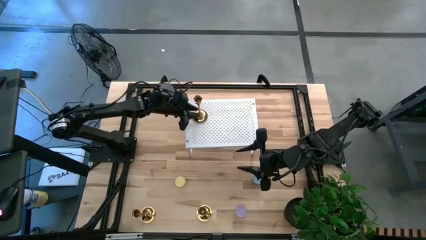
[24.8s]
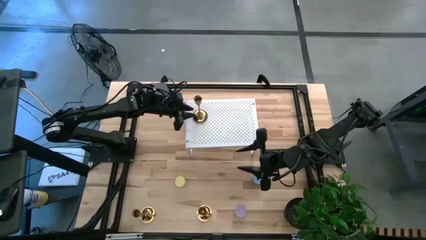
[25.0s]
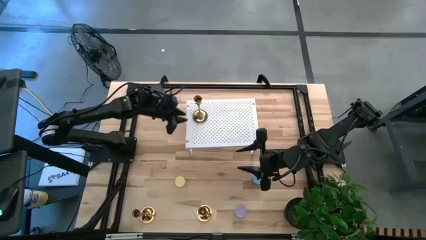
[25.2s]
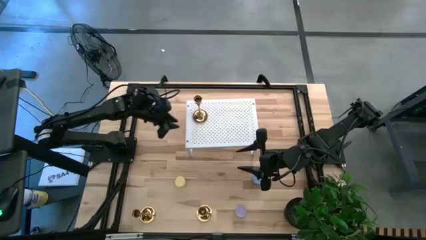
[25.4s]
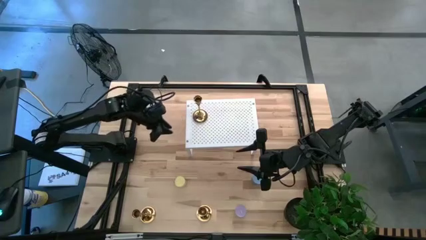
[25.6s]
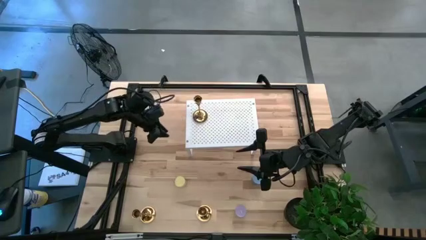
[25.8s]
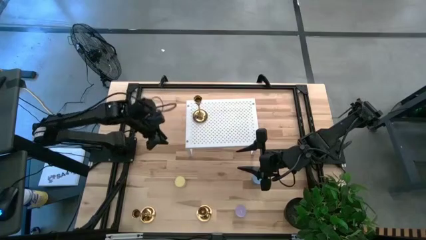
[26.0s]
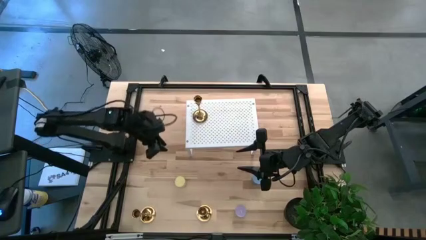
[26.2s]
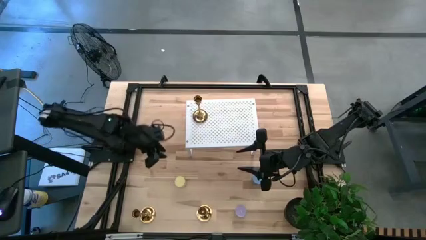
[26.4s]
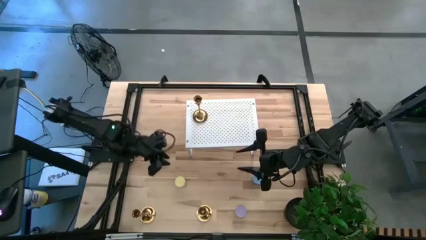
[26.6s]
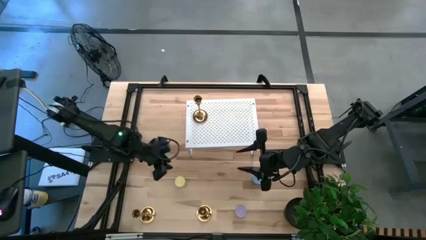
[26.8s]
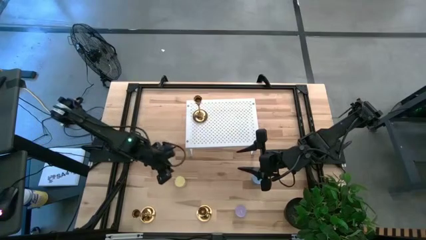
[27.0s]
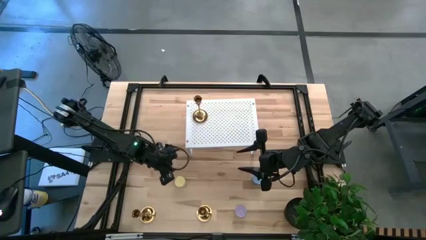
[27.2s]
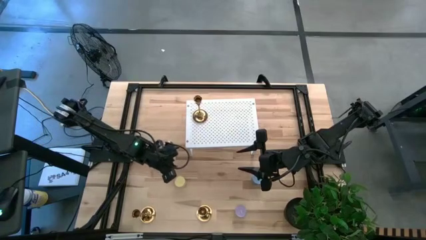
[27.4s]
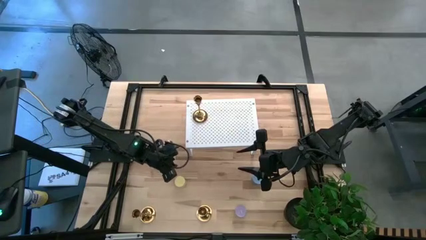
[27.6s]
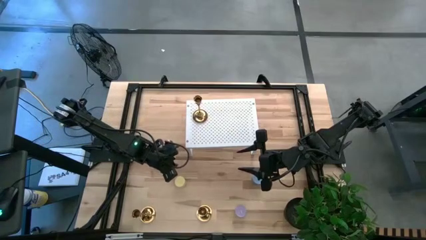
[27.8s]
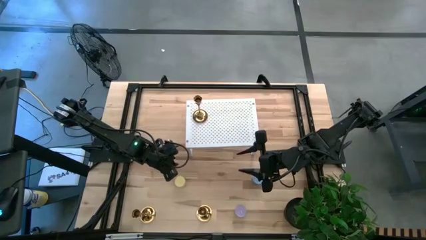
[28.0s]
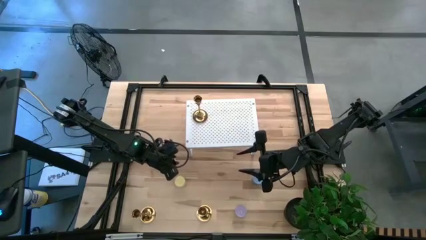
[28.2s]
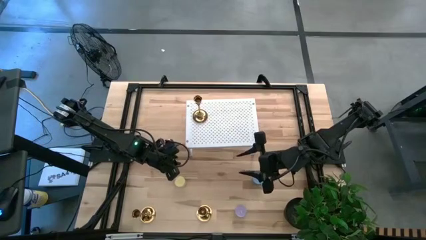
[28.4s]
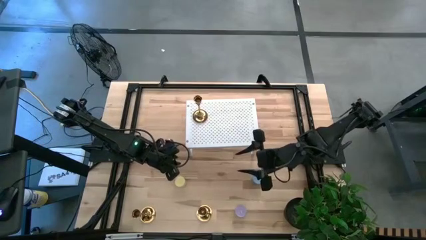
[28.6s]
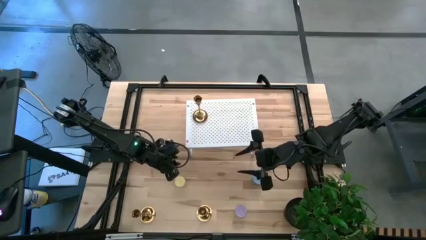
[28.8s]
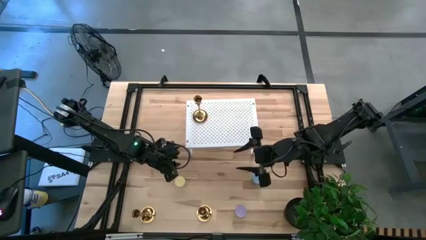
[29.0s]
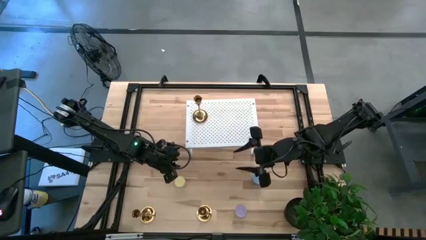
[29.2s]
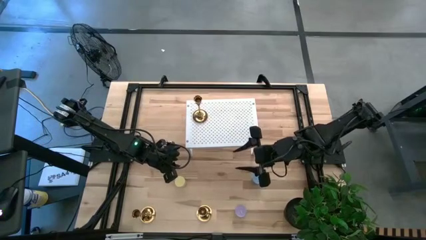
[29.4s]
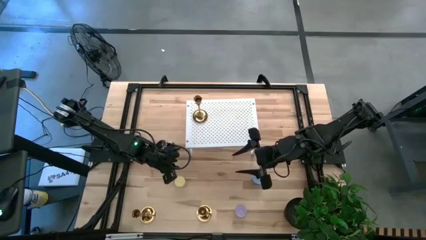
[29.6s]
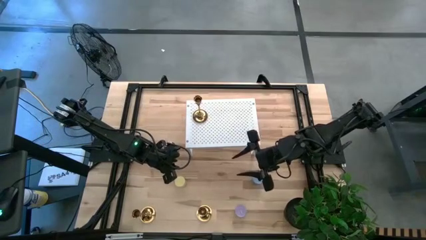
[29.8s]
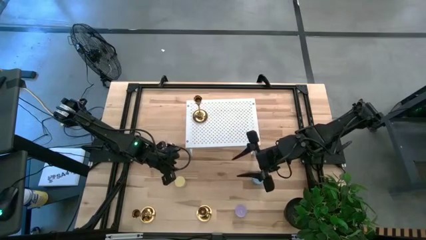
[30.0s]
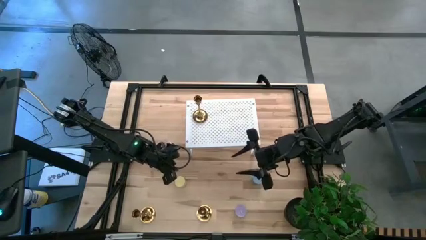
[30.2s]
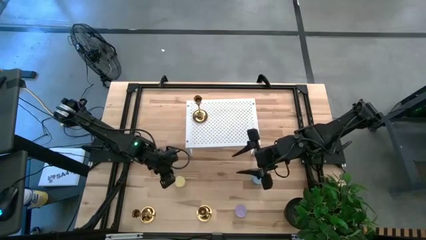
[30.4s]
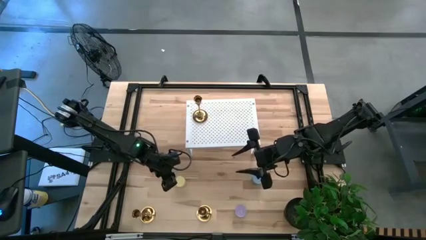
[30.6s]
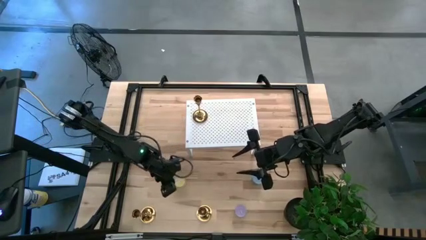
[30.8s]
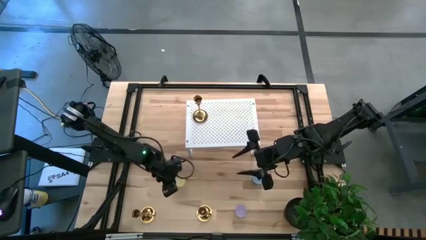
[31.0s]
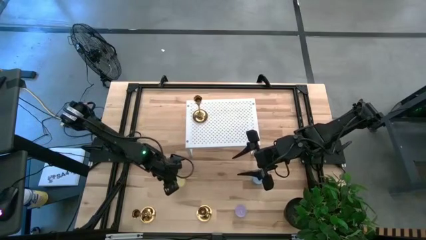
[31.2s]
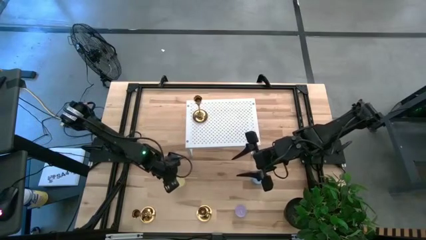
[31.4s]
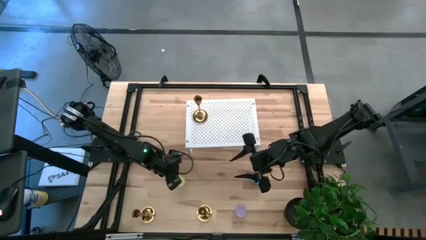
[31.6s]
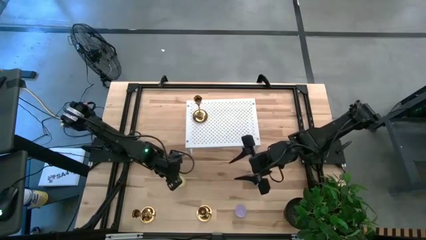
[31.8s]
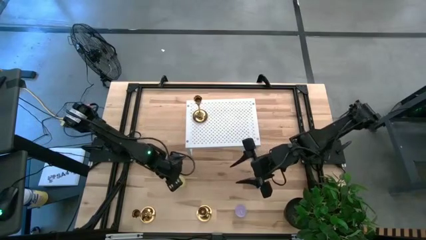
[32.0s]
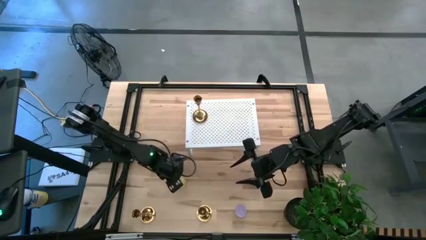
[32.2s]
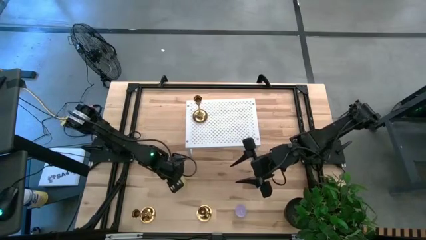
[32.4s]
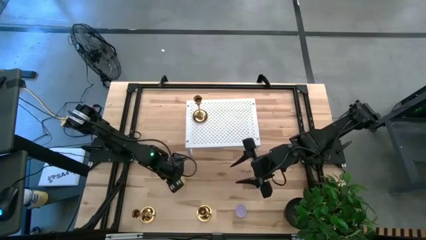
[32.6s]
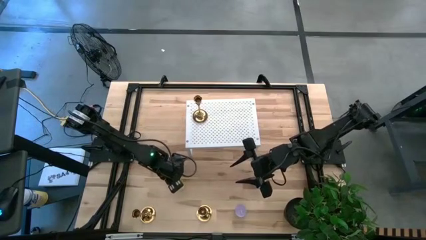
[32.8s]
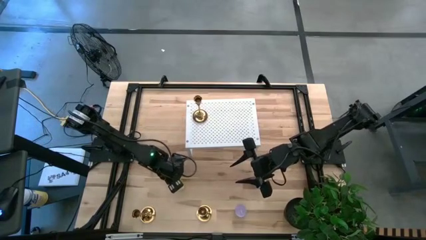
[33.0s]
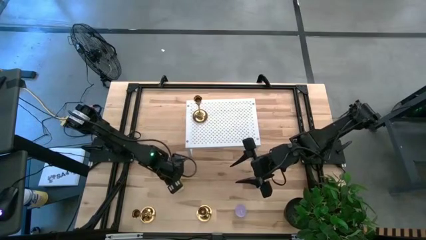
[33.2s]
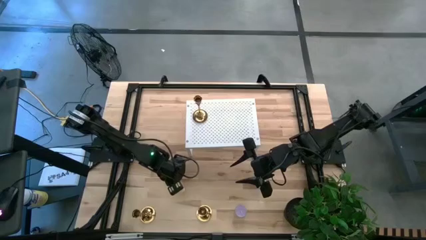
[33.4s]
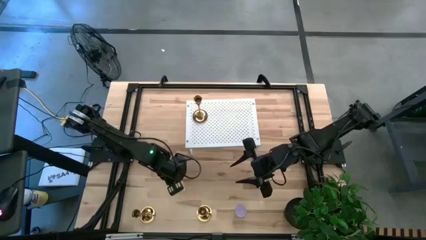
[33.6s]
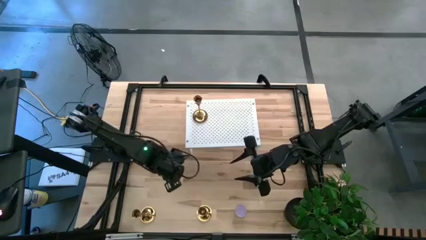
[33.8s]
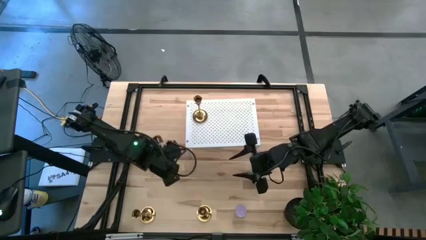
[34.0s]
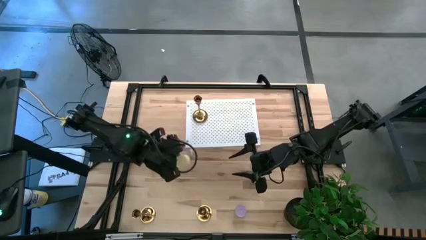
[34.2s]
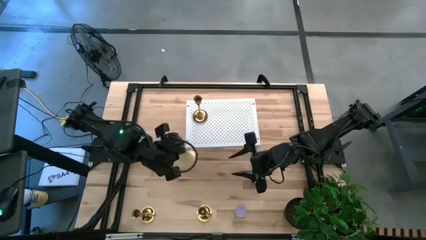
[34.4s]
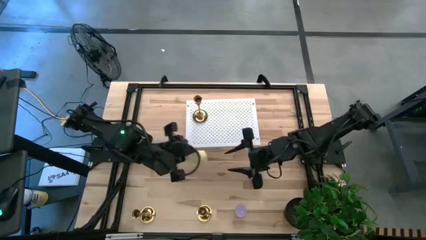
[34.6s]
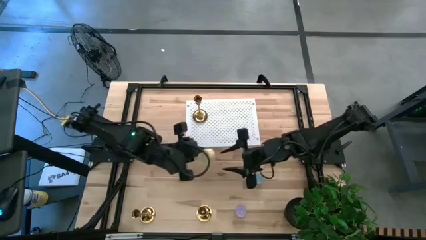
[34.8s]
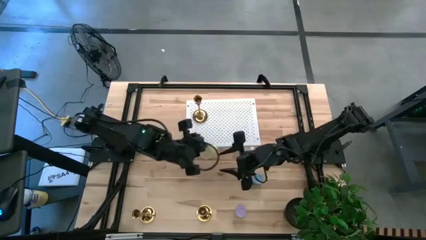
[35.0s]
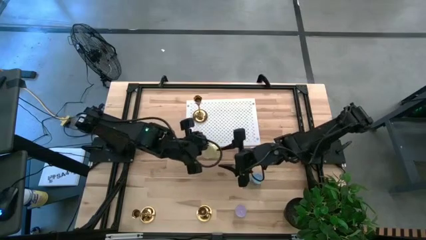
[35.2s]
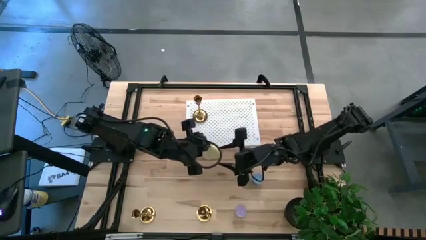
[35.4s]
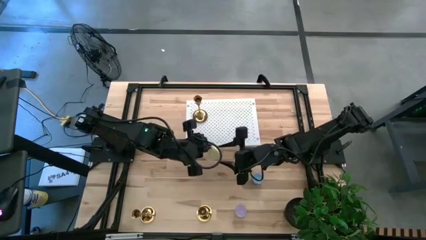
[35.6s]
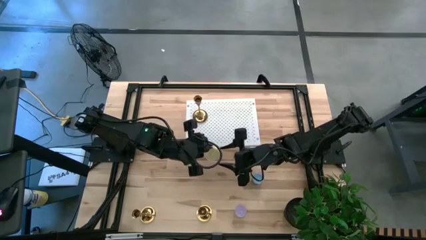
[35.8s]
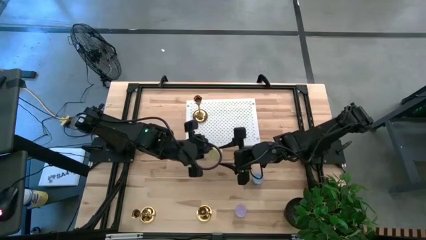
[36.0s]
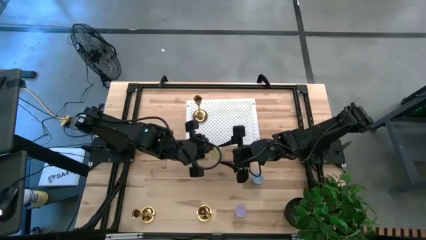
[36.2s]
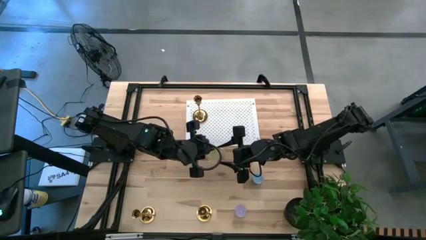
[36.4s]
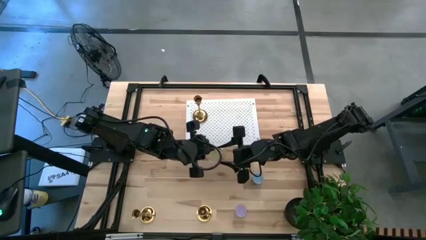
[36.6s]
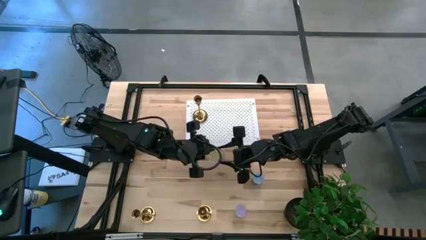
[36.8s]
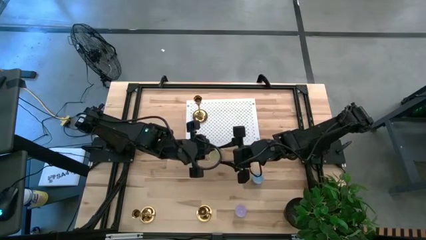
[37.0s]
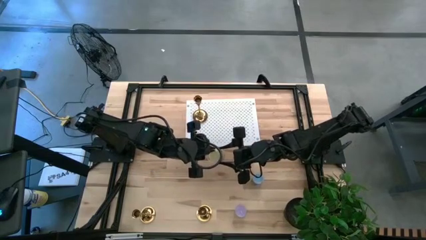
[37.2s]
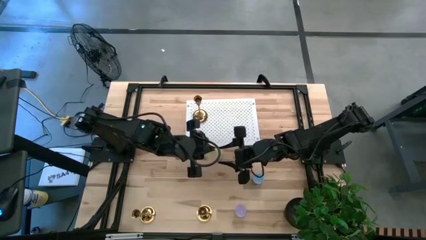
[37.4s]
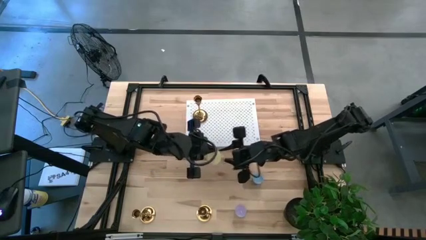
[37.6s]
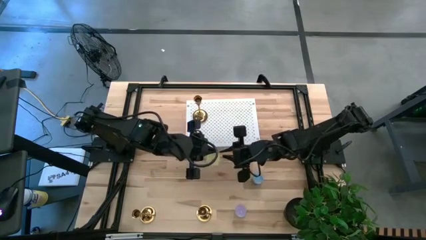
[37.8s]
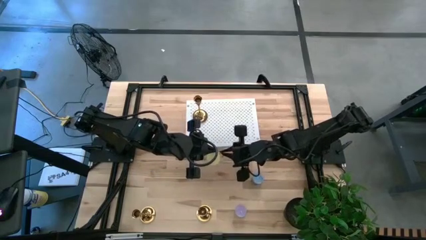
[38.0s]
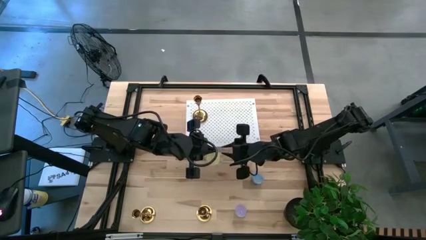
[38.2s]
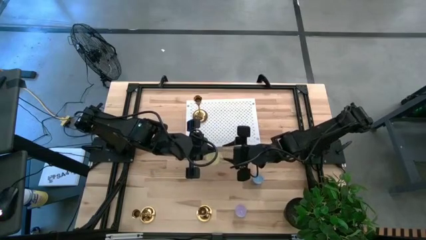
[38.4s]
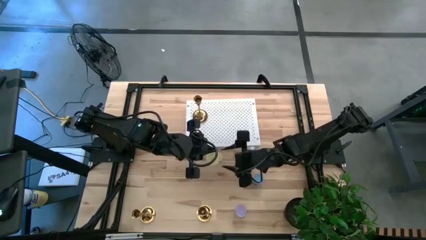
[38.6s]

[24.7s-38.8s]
Task: Pick & Place candle stick holders
Put the yellow scented candle on the shelf
